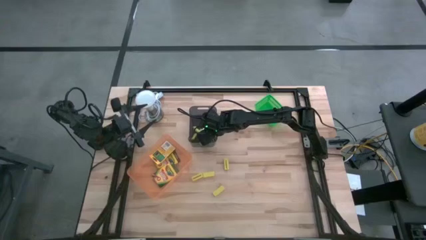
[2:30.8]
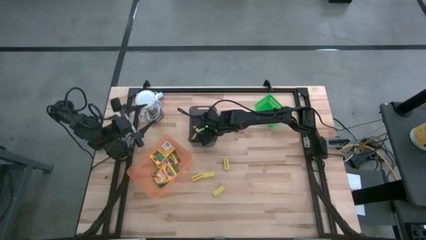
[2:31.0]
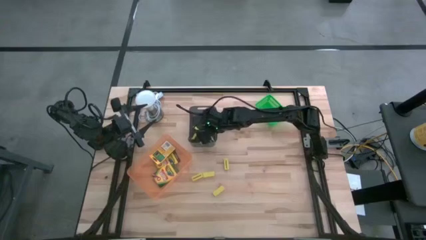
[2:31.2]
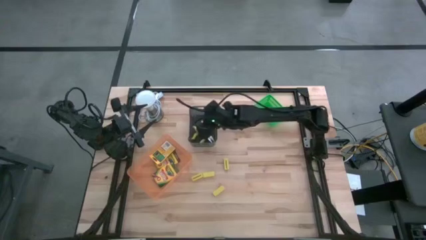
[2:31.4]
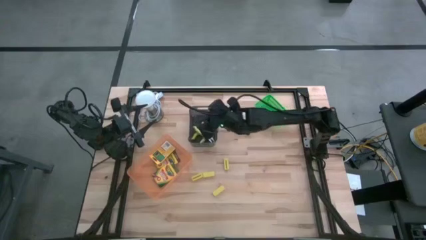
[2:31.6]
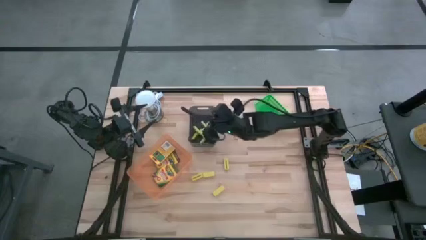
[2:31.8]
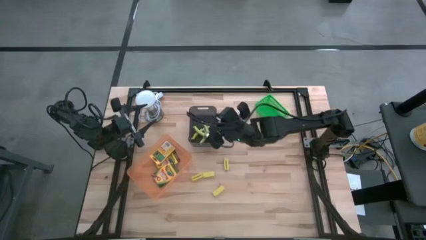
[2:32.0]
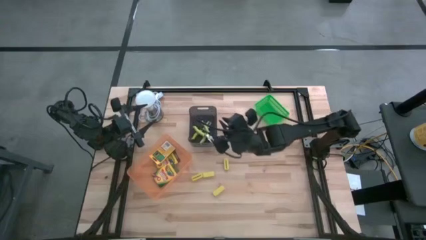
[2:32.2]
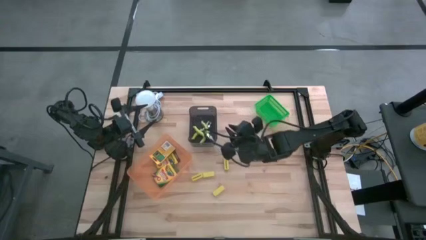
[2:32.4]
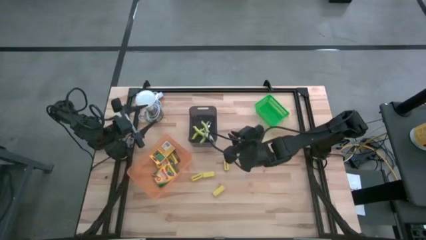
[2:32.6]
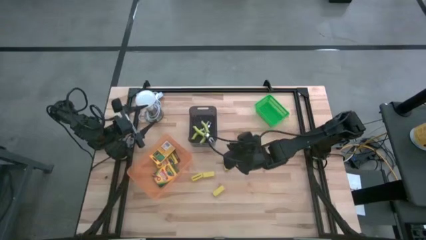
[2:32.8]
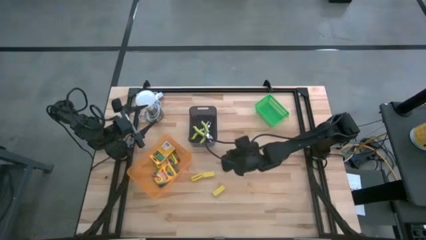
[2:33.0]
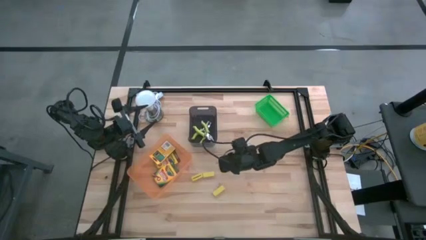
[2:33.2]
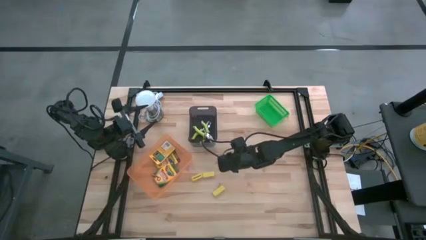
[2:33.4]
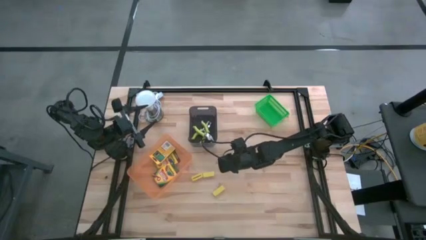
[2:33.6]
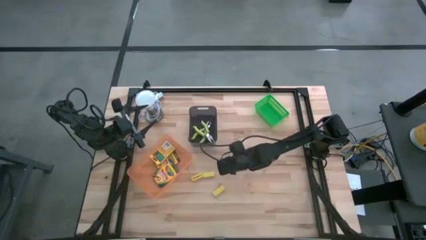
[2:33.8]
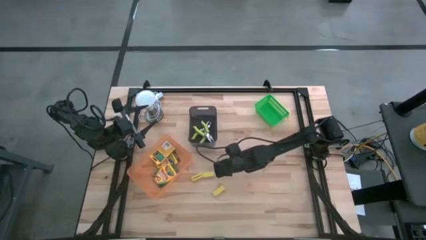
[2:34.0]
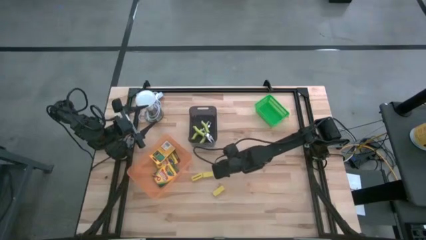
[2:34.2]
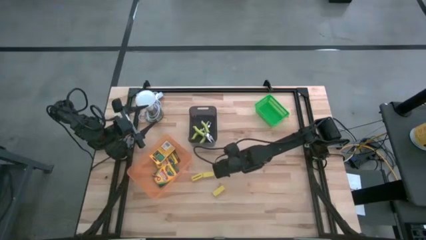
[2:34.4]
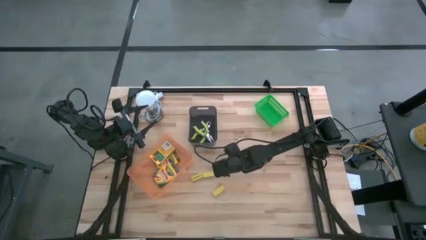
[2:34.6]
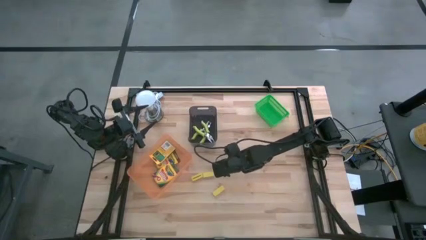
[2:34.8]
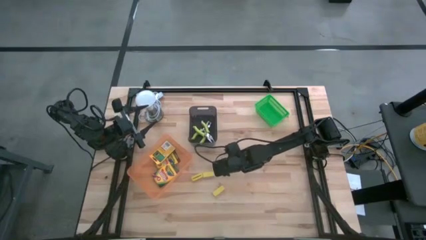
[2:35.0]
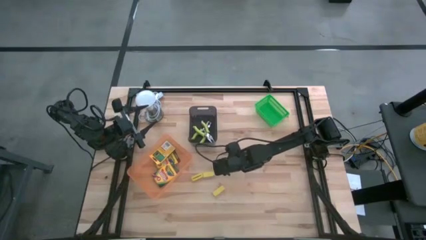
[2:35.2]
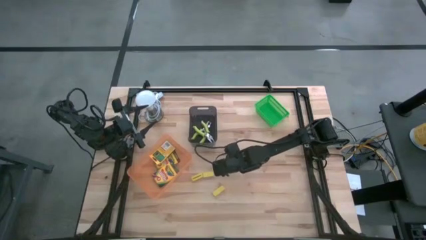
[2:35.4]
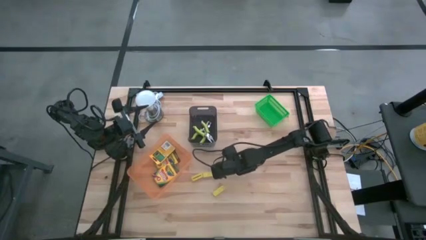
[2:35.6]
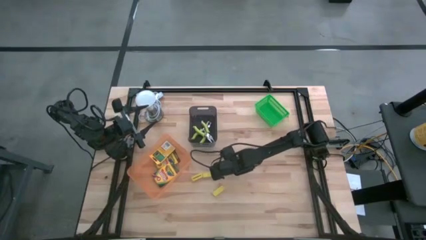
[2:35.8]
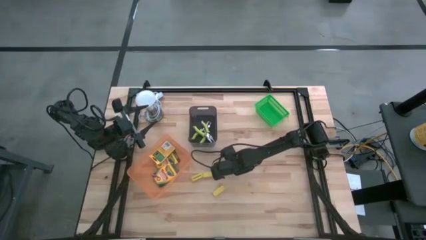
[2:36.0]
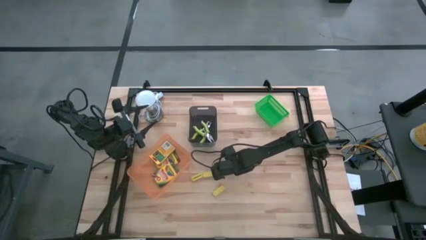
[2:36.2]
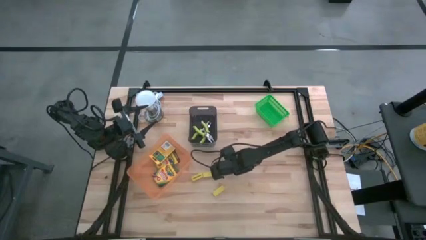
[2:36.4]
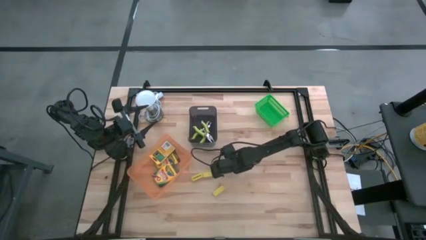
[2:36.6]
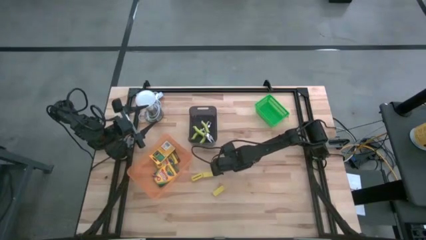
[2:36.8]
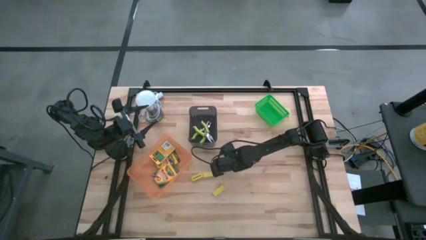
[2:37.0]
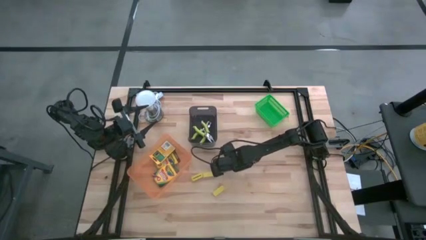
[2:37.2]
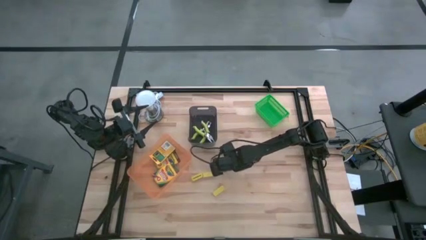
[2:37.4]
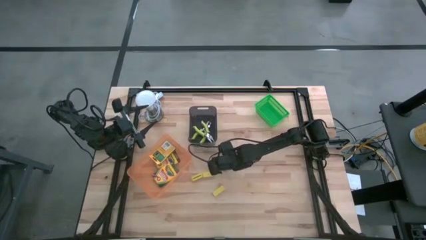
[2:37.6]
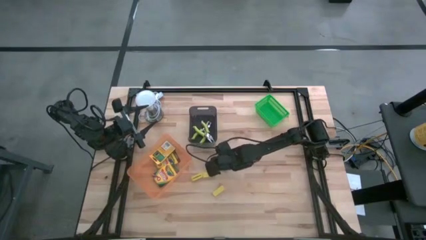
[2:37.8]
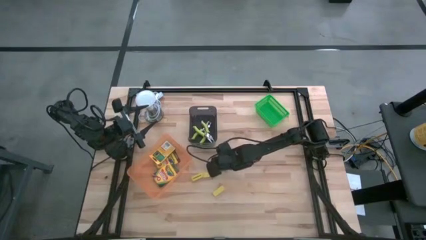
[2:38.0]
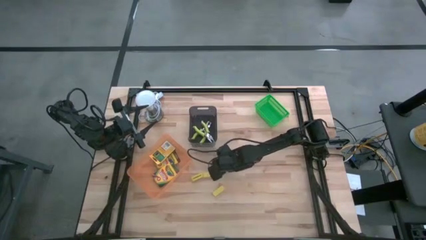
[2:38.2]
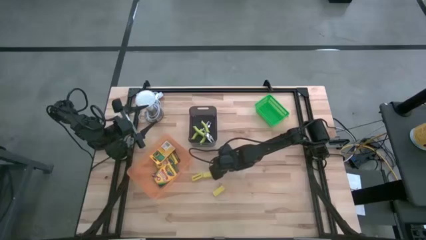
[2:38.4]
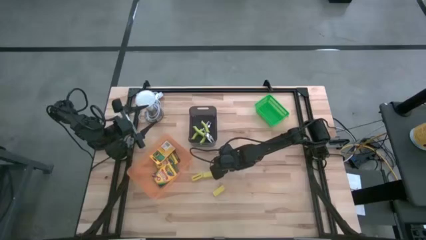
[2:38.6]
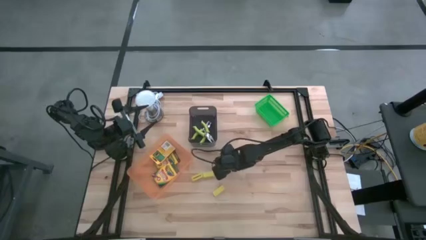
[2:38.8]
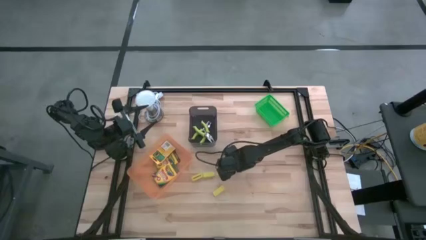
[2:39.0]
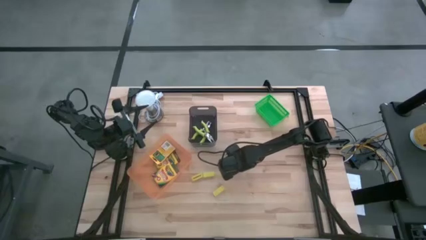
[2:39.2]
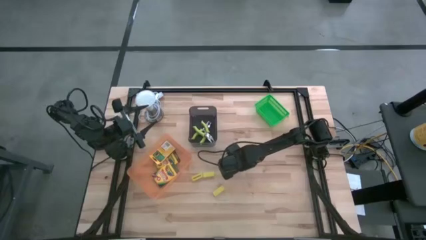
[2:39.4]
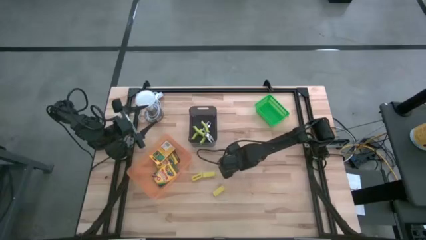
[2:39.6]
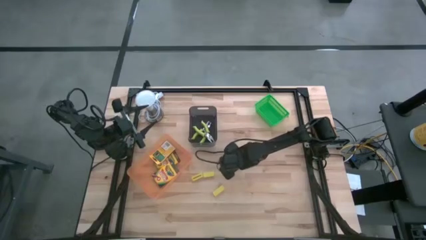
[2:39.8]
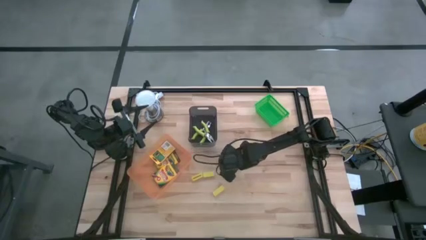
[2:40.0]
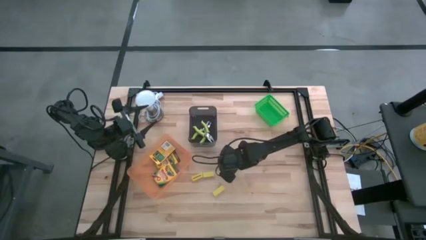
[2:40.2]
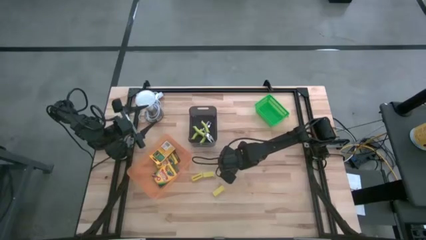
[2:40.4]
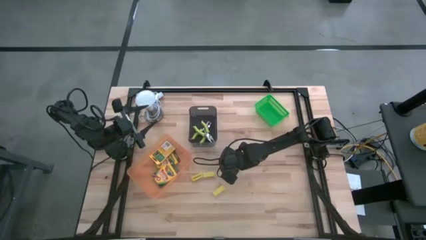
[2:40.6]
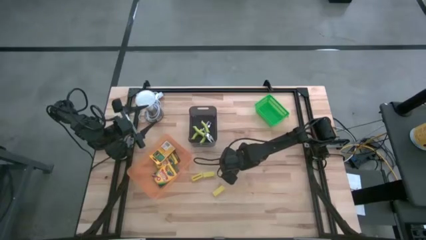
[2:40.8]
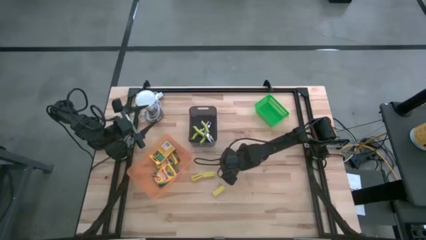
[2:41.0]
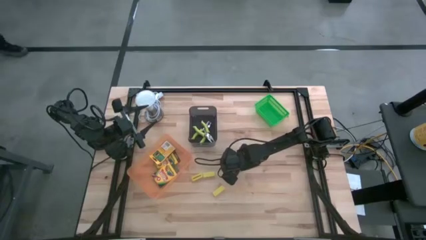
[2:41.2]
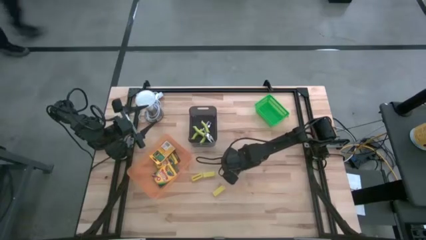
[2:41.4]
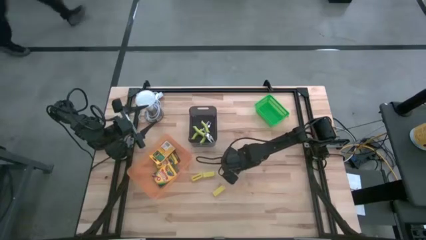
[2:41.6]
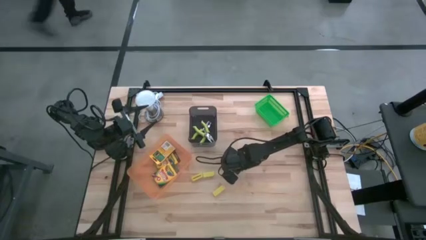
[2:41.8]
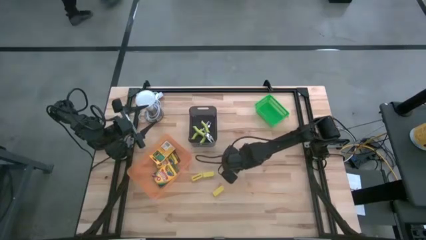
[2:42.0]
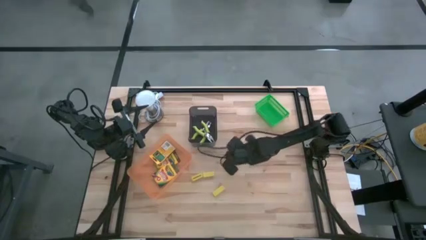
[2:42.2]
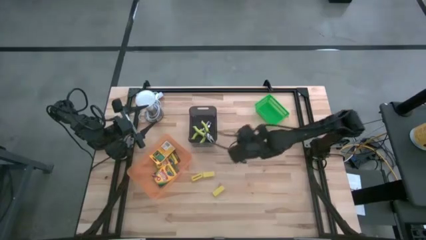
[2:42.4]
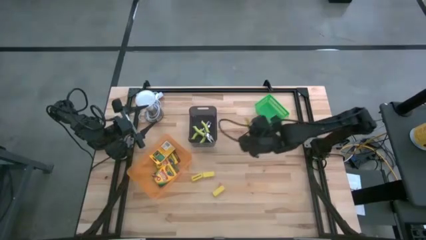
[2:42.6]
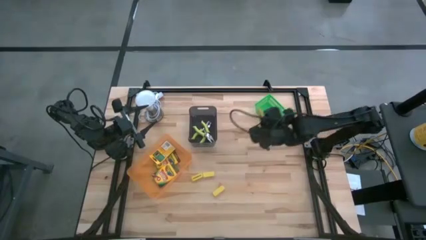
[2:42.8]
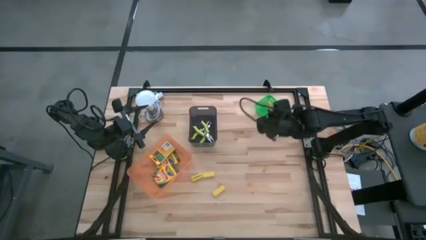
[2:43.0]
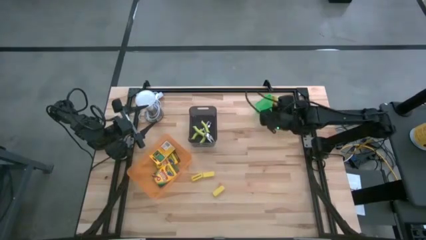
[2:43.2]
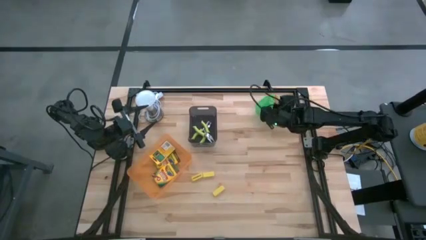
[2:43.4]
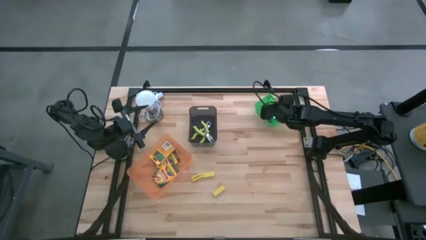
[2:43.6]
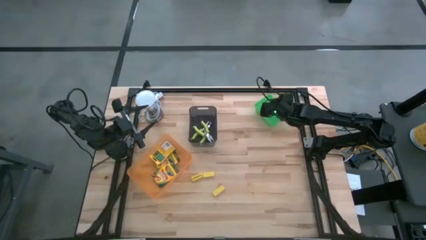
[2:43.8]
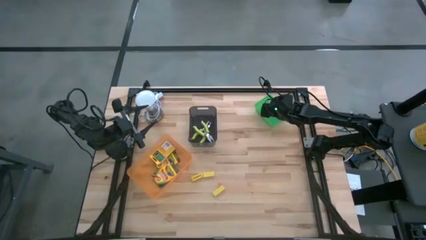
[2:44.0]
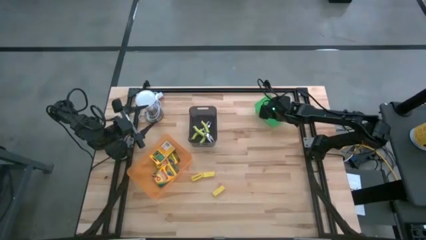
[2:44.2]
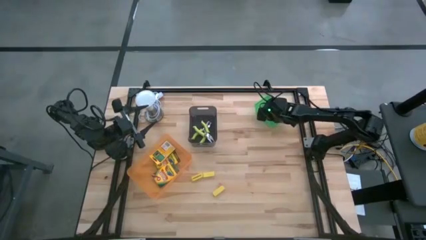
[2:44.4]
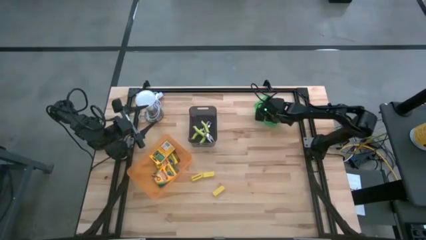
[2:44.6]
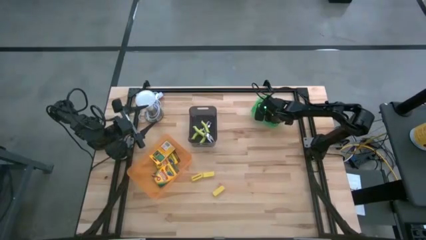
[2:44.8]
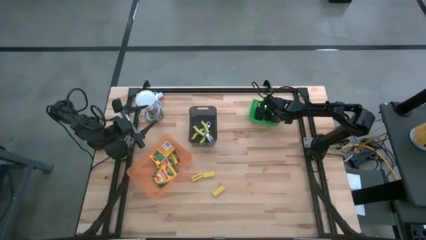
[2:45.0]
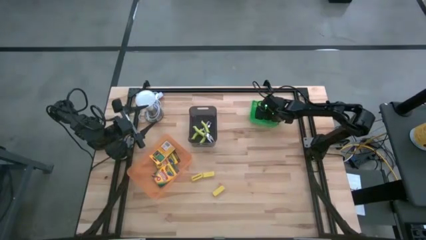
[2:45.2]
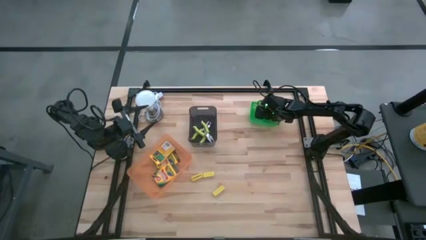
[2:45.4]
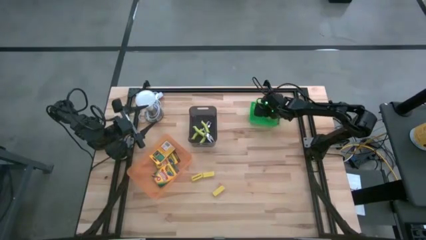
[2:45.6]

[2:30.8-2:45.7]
Task: Pick & Place School Supplies
Put the yellow eraser into the green bin
